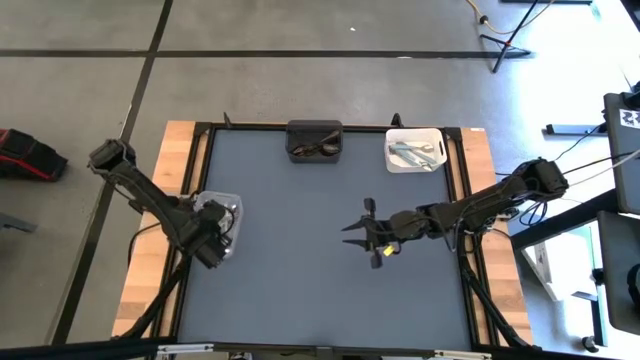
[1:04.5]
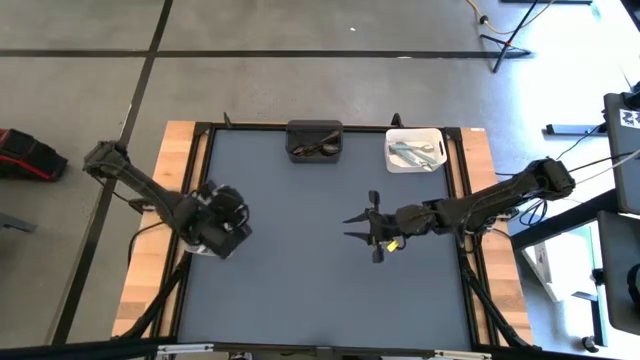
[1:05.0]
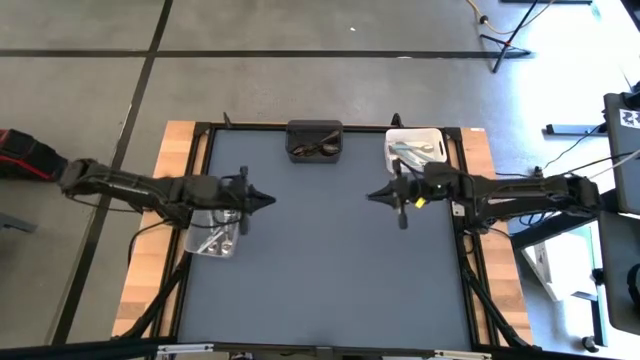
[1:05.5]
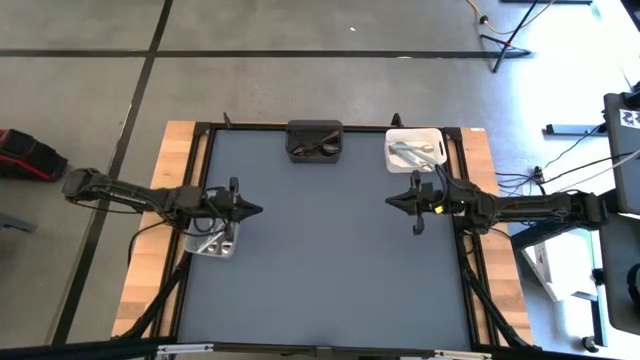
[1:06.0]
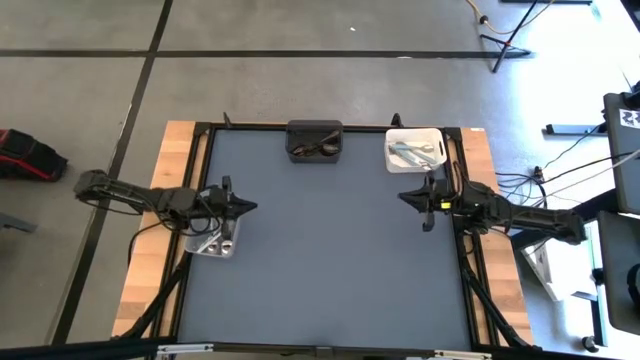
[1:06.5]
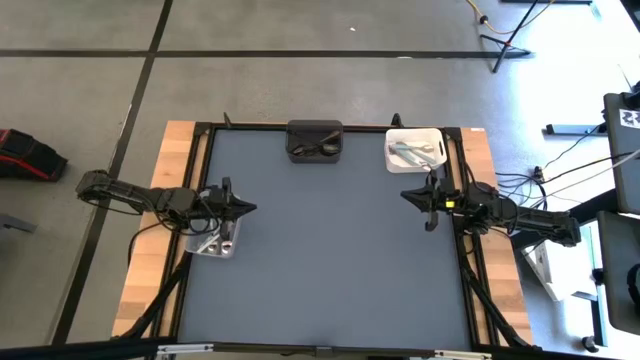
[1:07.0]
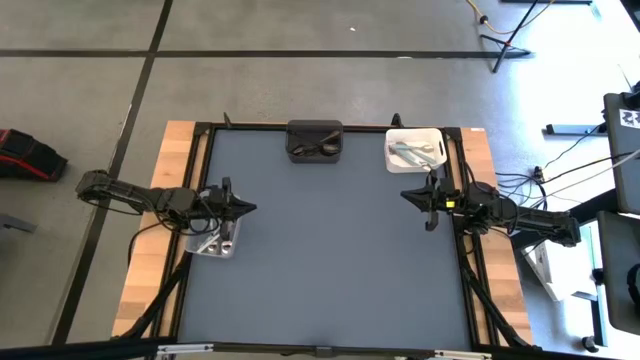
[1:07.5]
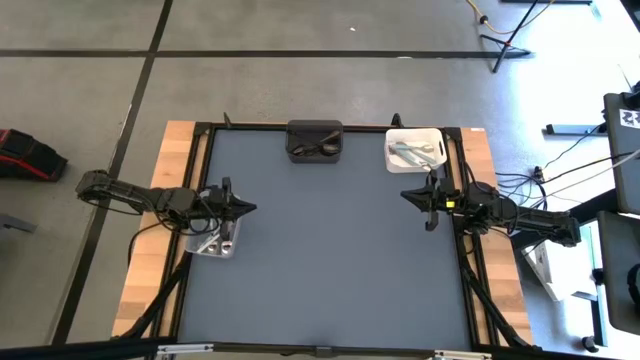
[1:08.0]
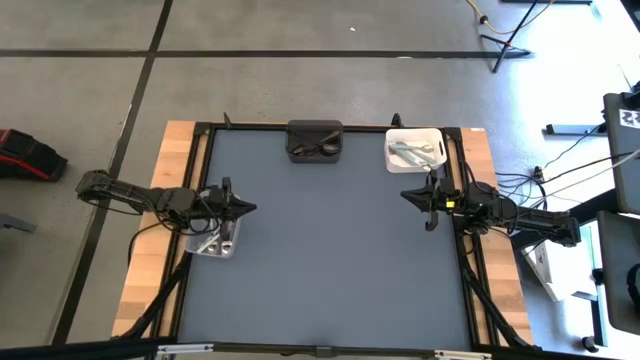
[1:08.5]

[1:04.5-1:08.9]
Task: Sort silverware by color (type)
Return to Home Position

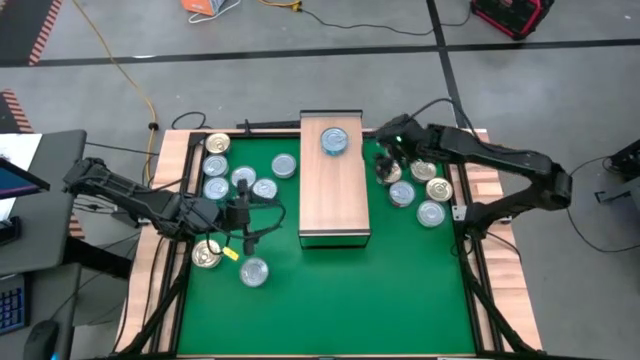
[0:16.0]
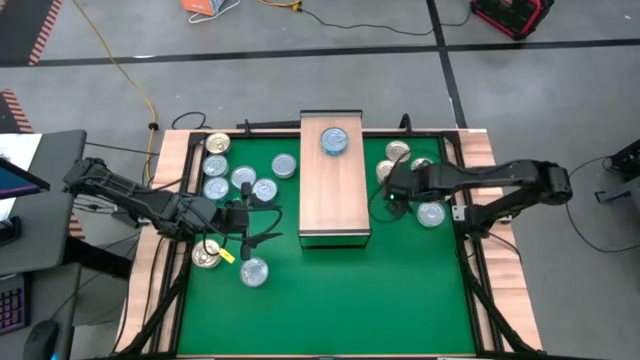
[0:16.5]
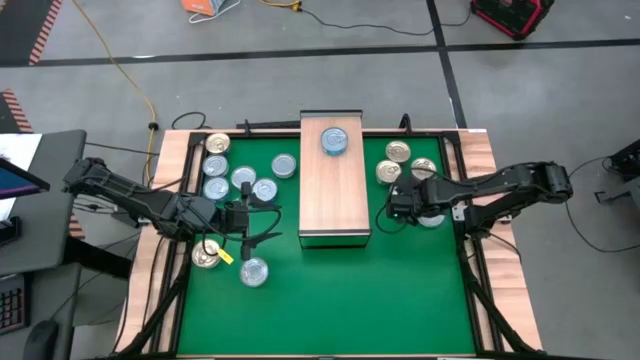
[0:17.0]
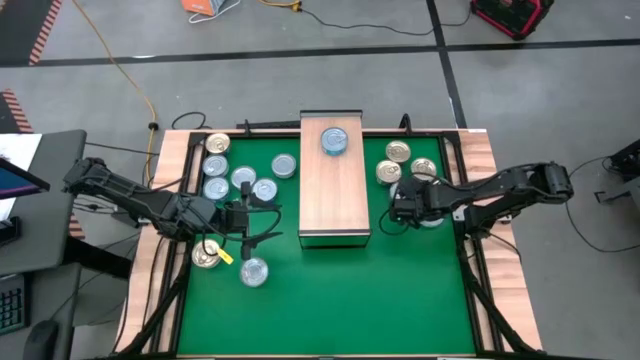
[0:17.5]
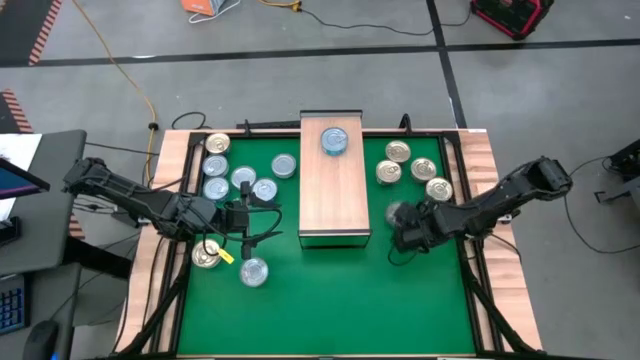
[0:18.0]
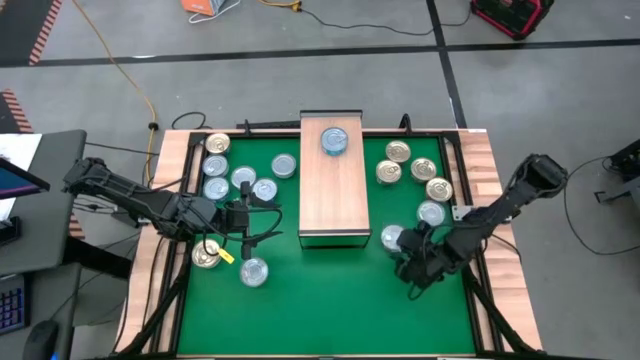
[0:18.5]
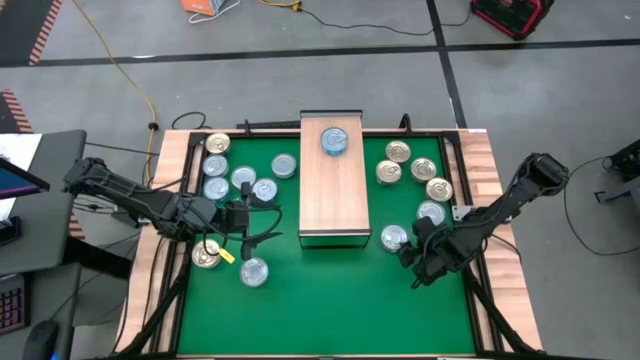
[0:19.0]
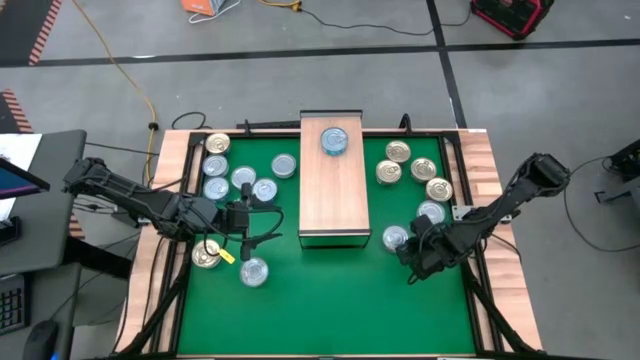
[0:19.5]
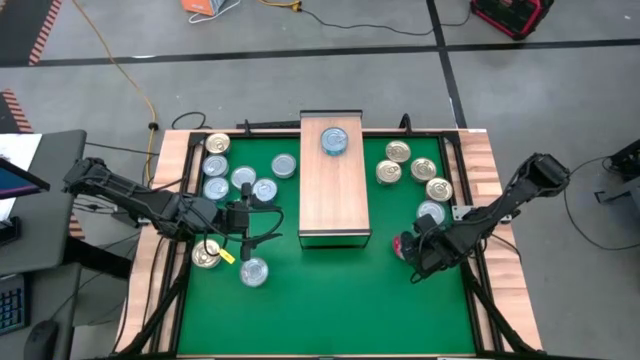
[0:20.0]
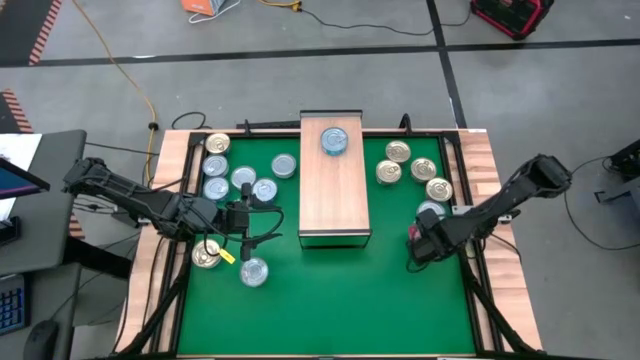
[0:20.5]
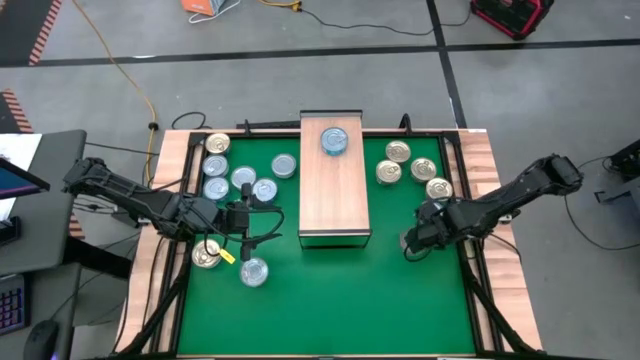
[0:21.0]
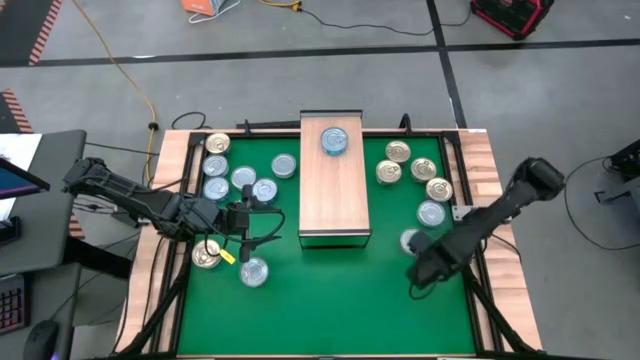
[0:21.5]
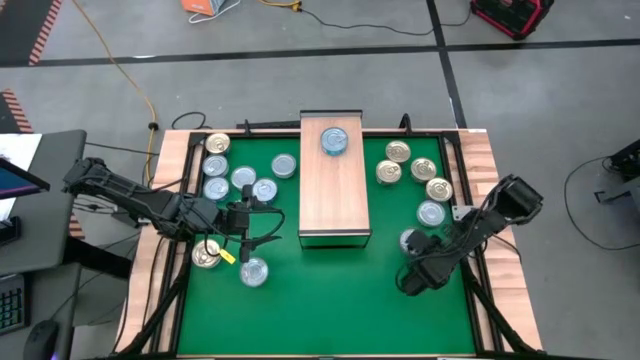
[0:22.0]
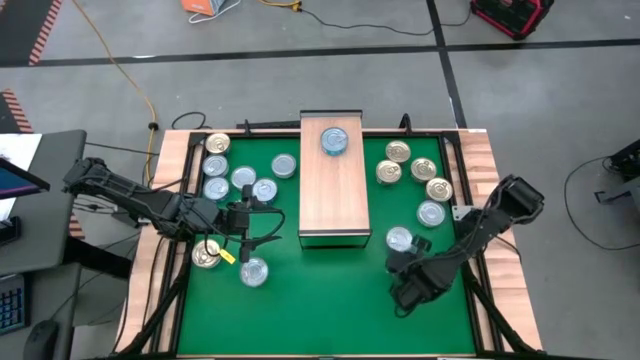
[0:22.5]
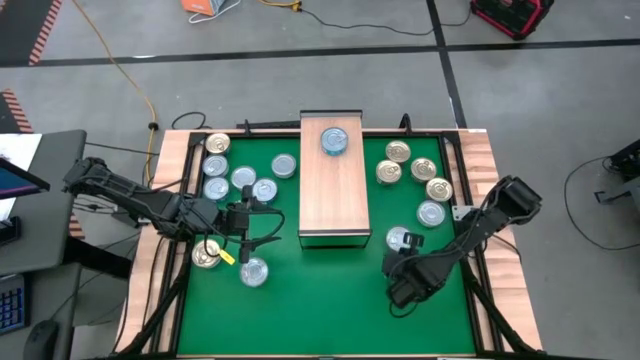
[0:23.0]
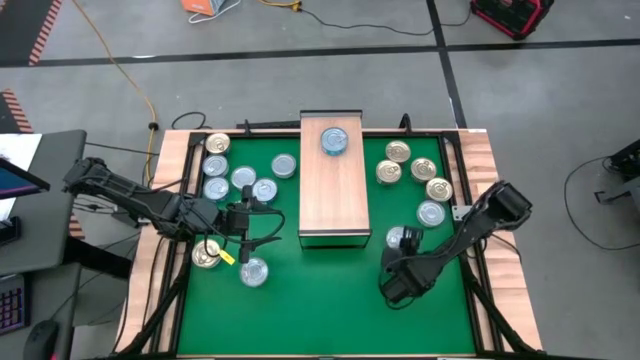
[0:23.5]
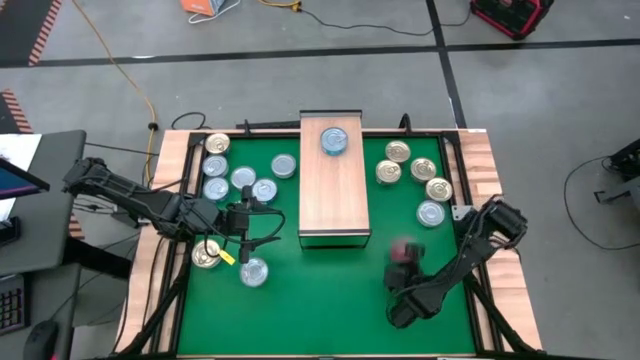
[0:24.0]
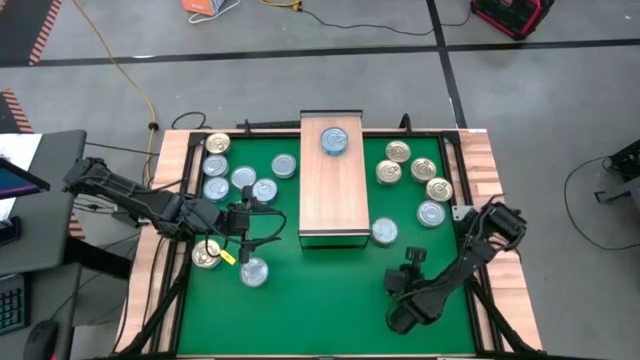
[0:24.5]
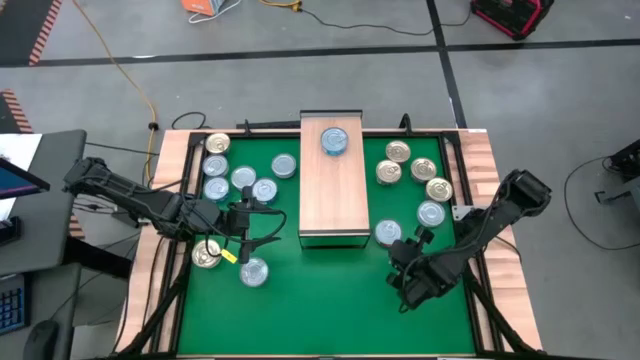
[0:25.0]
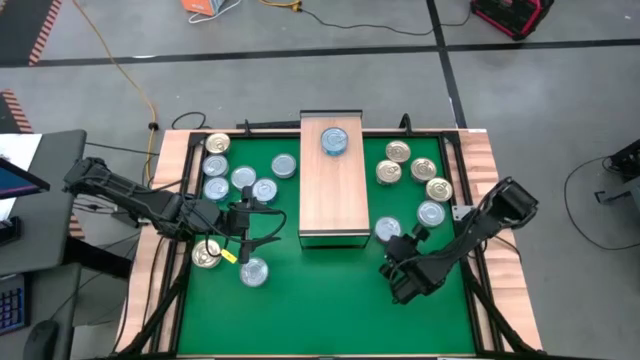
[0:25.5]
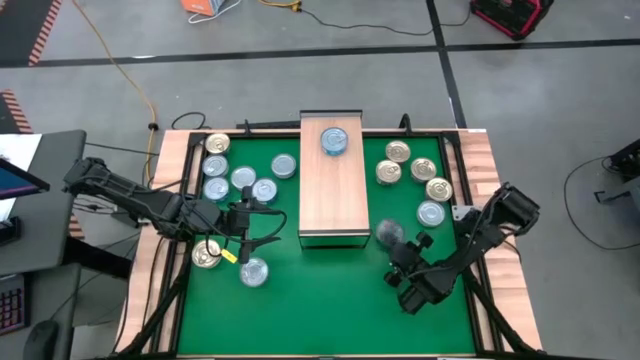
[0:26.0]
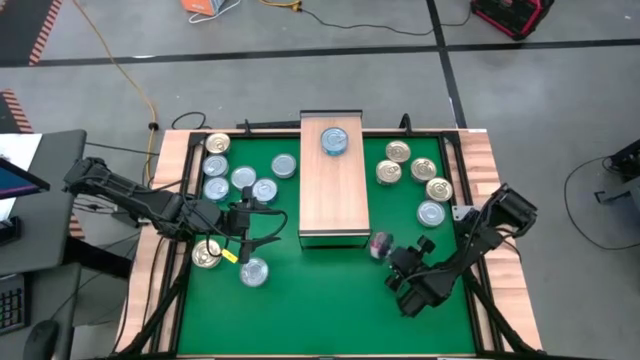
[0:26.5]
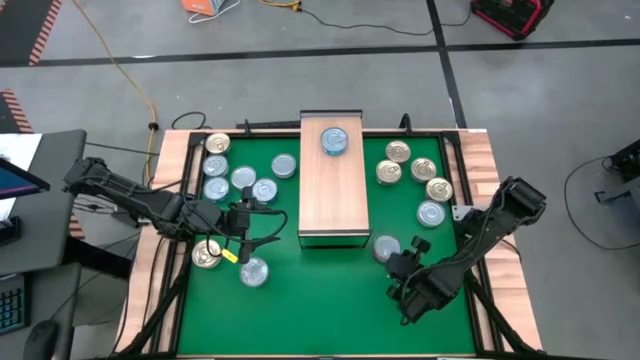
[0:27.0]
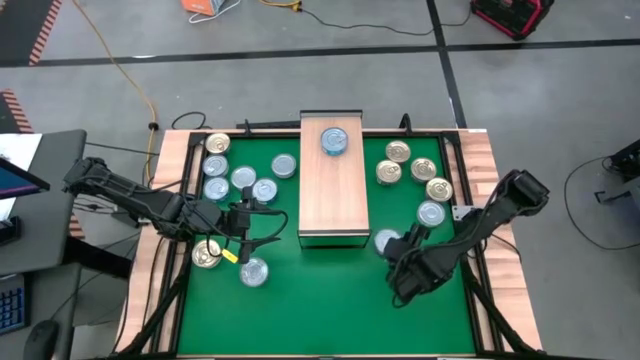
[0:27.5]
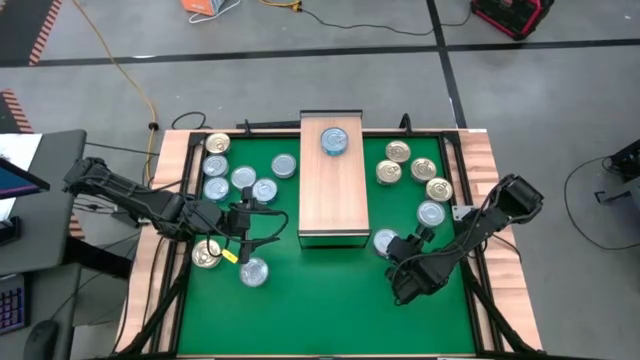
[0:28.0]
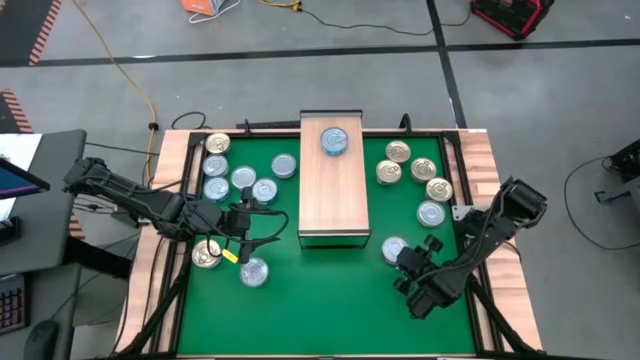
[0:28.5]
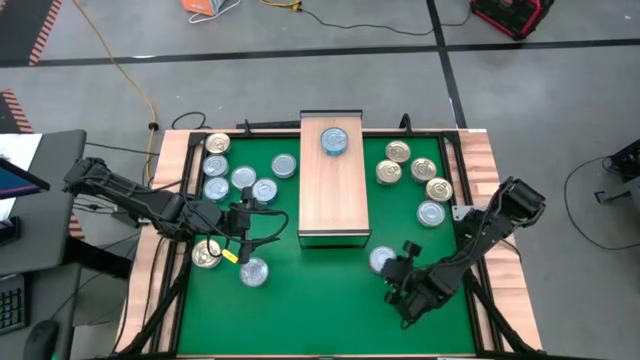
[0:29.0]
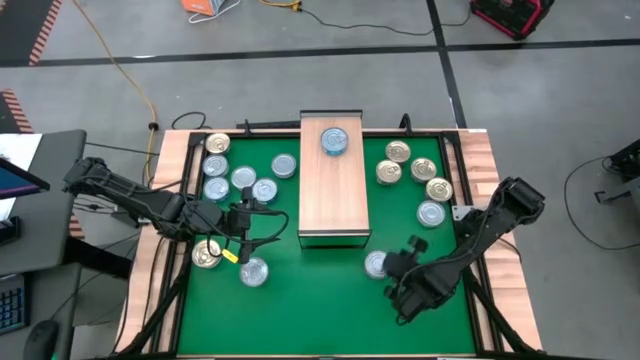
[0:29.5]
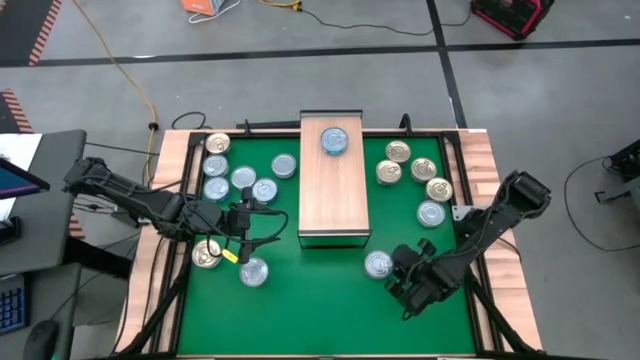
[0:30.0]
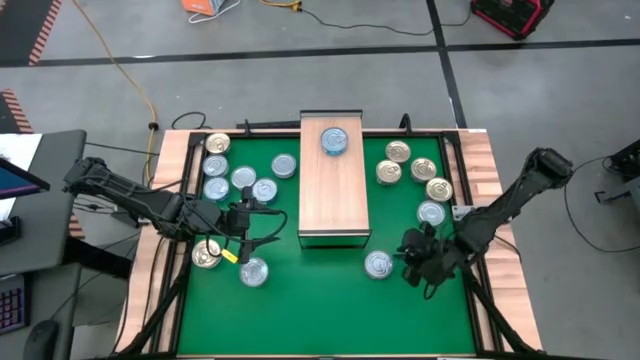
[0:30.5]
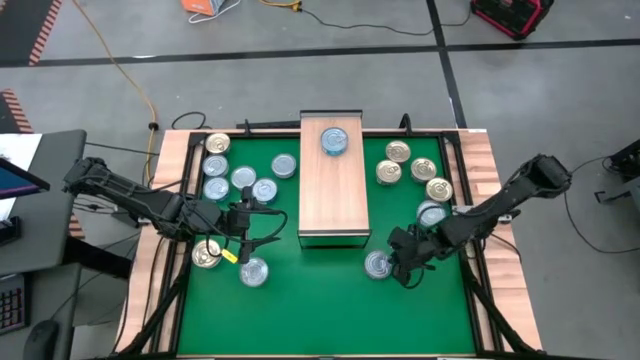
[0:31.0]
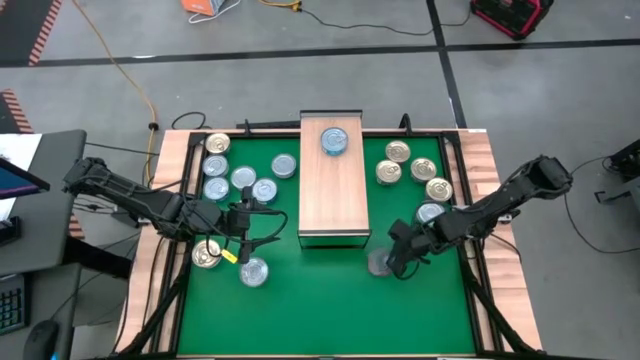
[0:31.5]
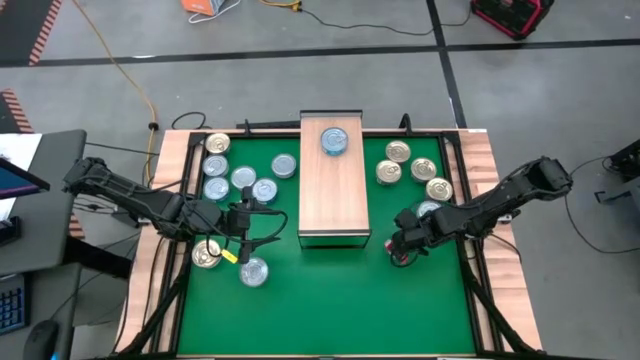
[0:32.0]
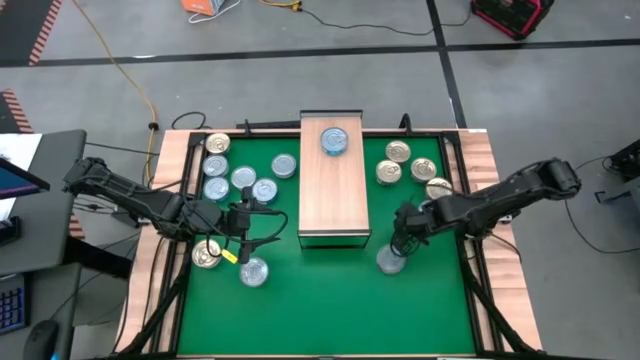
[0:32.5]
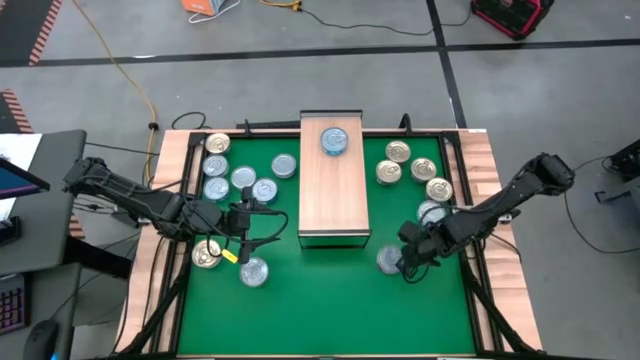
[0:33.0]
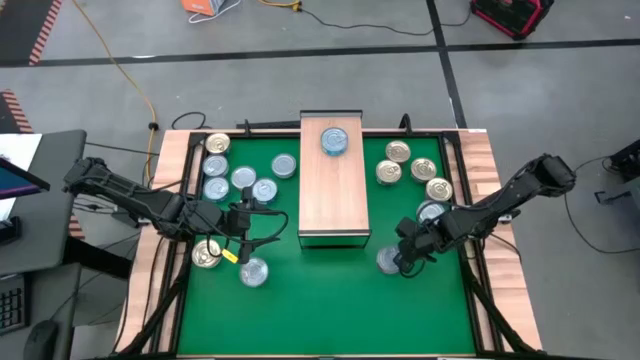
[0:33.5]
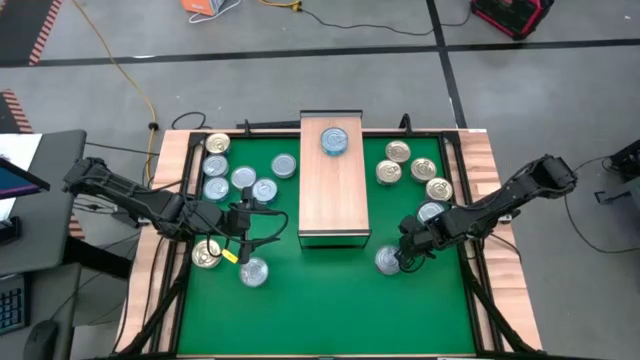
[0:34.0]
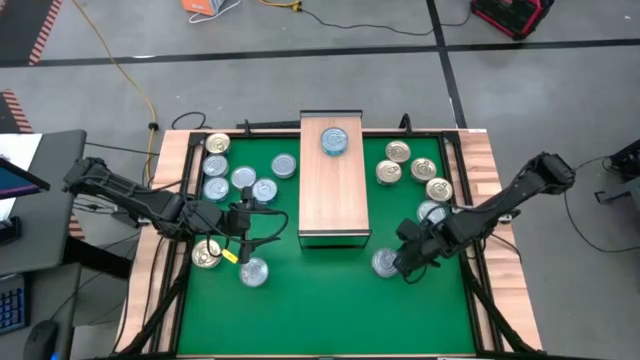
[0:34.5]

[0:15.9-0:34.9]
Task: Stack canned seafood by type on shelf
Stack the red tuna can on top of the light blue tuna can on the shelf
